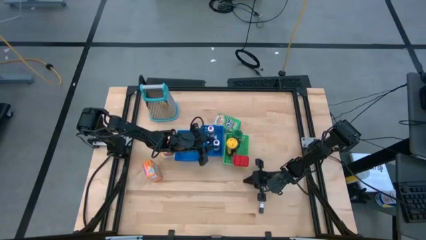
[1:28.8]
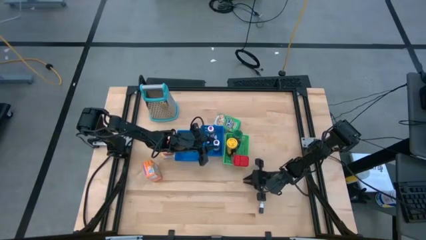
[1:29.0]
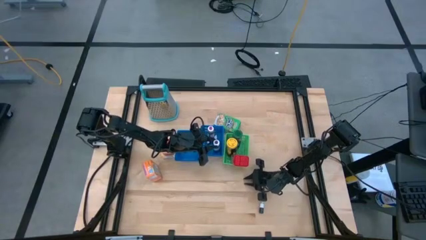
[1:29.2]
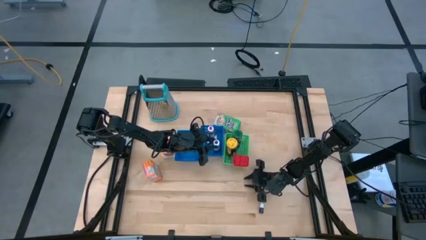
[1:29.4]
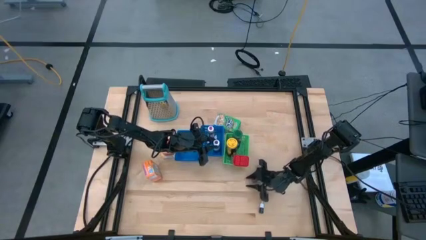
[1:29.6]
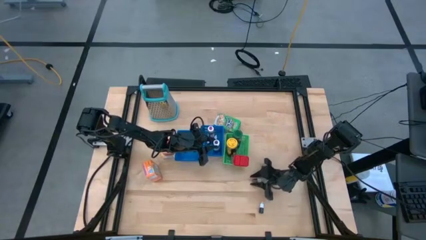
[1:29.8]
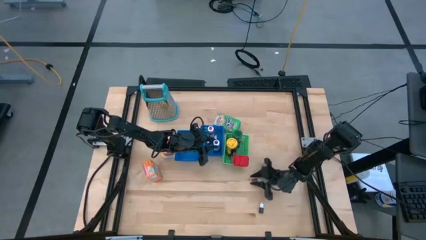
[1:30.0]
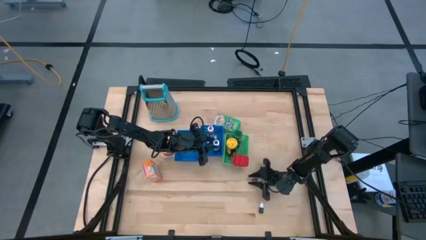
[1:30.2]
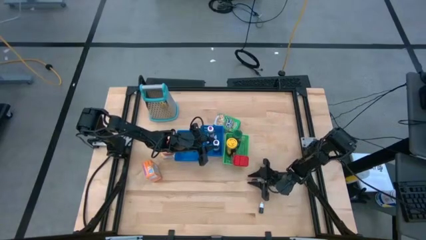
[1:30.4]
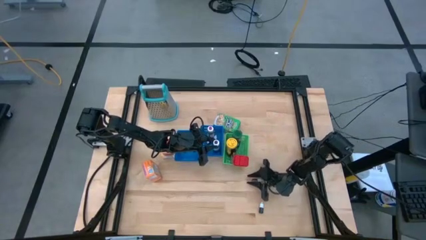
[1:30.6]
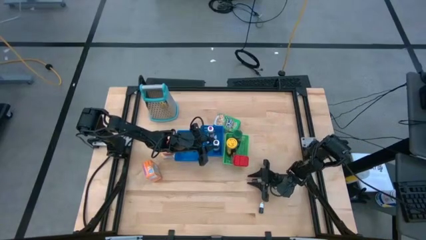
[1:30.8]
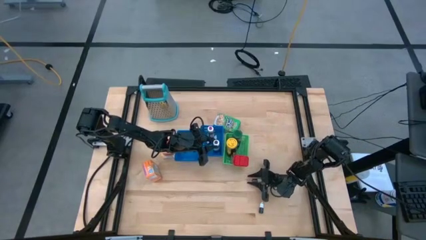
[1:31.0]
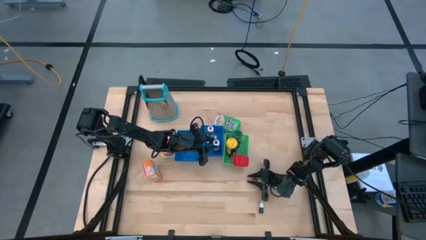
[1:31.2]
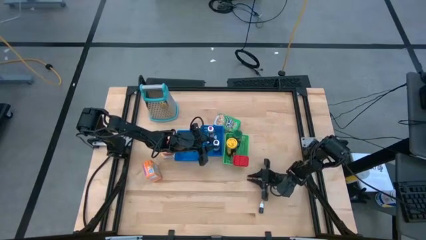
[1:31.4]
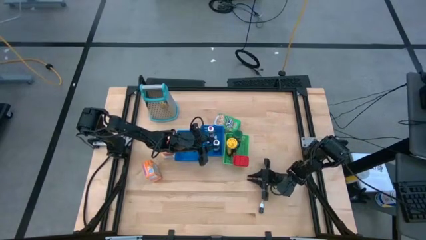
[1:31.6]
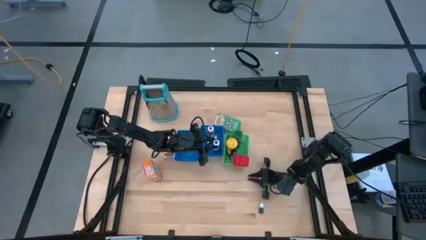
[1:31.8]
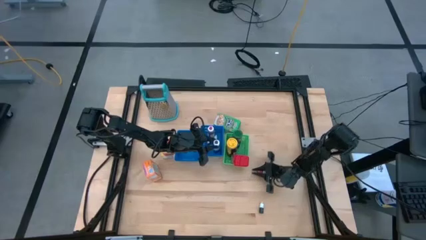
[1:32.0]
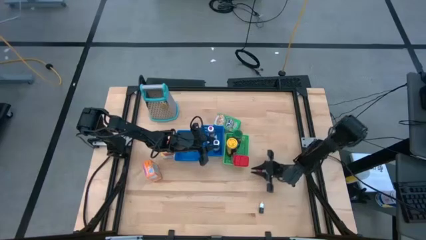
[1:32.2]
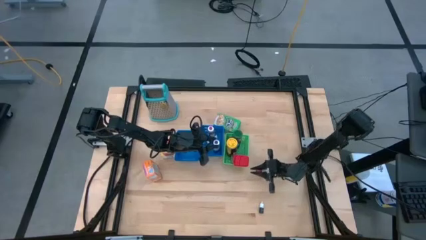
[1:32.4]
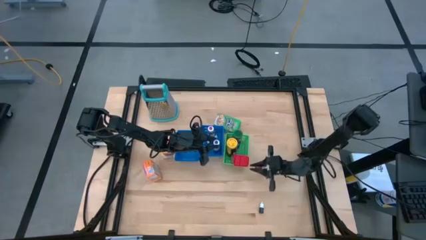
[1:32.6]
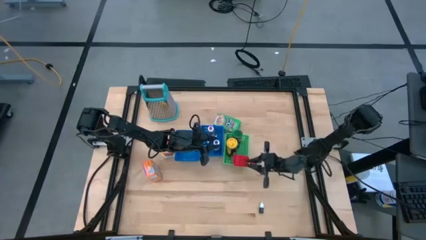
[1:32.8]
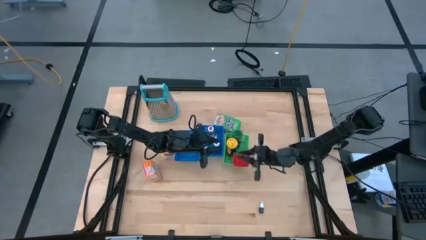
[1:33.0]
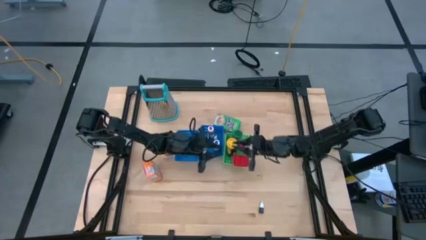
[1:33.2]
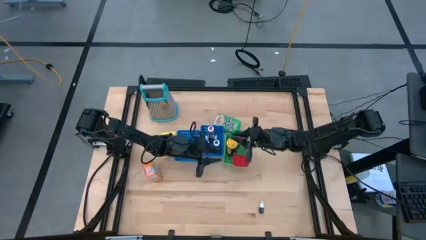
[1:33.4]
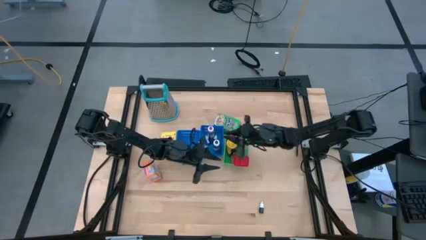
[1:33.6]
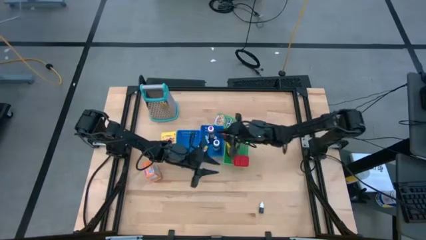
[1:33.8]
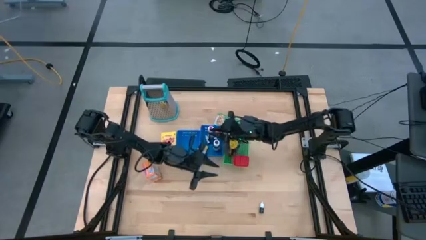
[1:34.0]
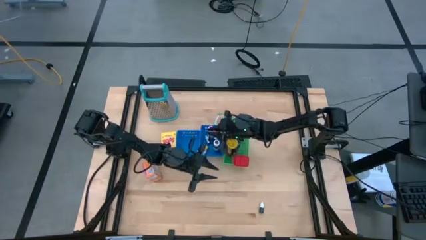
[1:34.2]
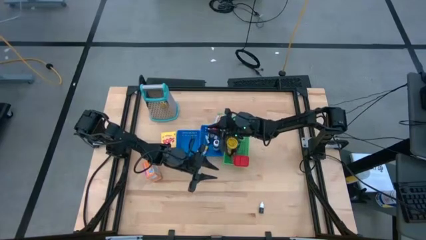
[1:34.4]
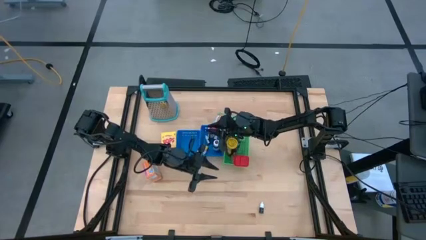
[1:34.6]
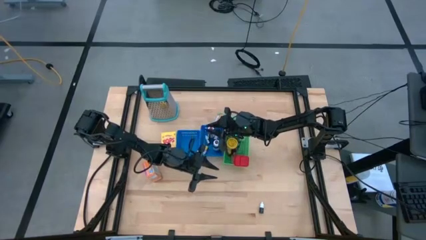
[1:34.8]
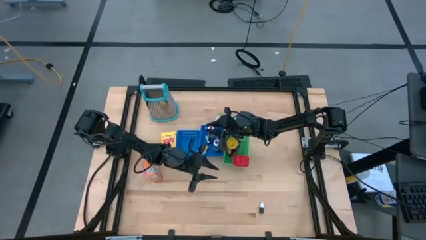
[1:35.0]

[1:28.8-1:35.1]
Task: Pick & Place Kitchen Items
Put the small pink food coloring bottle into the right blue bin

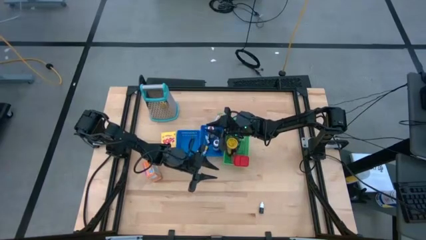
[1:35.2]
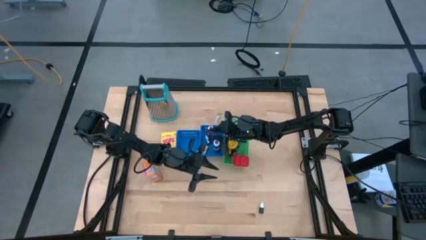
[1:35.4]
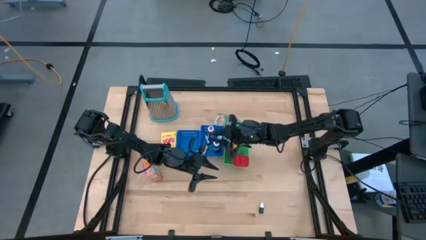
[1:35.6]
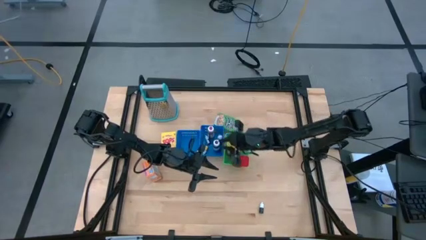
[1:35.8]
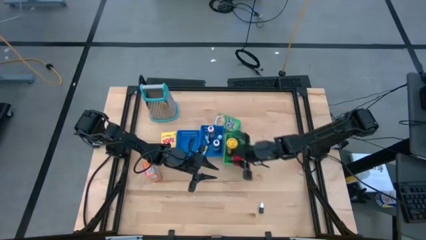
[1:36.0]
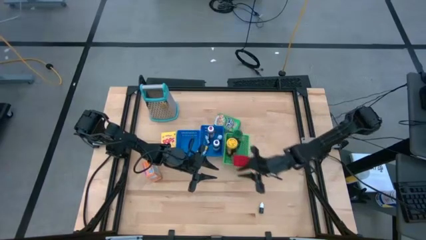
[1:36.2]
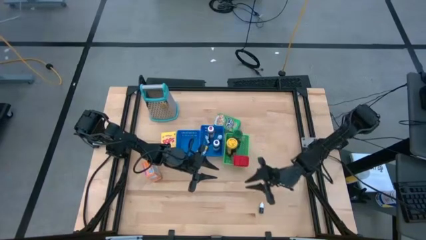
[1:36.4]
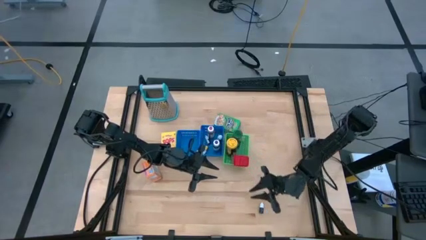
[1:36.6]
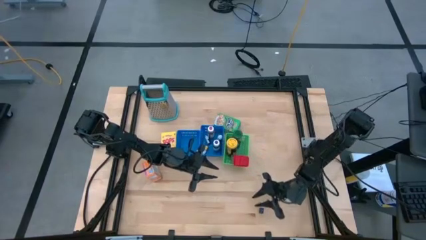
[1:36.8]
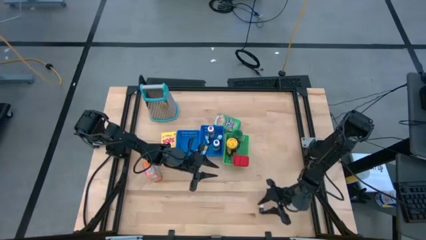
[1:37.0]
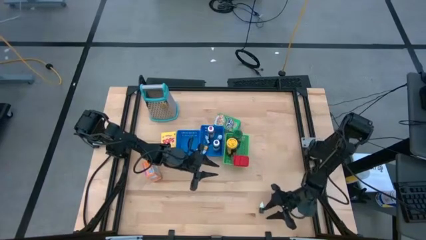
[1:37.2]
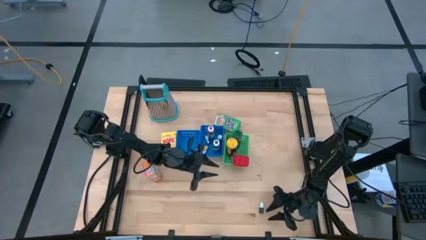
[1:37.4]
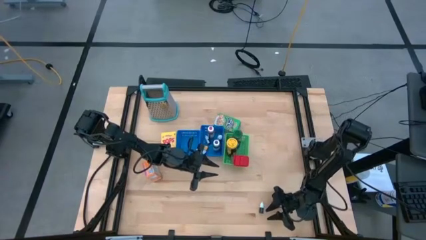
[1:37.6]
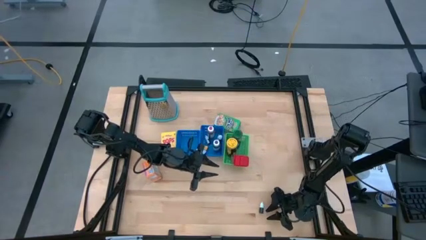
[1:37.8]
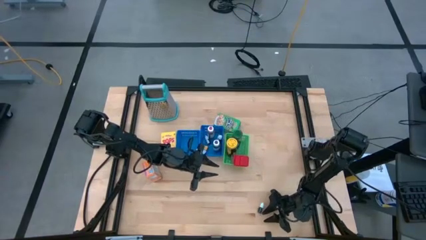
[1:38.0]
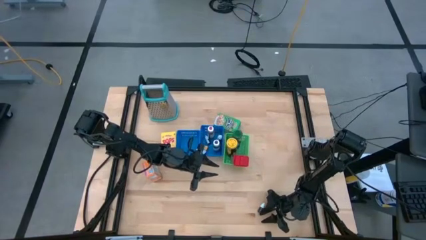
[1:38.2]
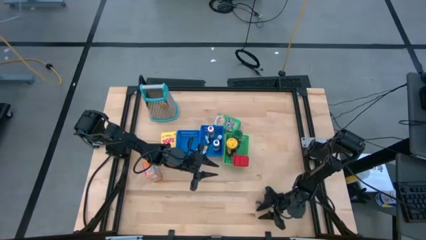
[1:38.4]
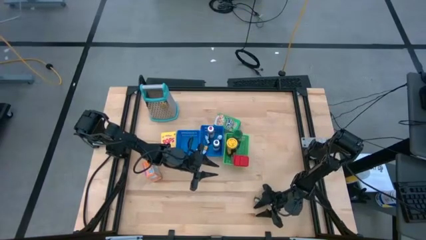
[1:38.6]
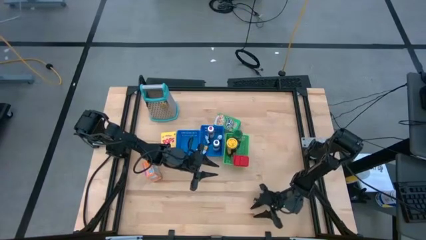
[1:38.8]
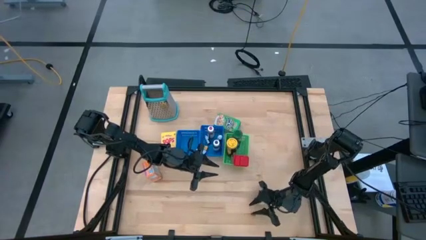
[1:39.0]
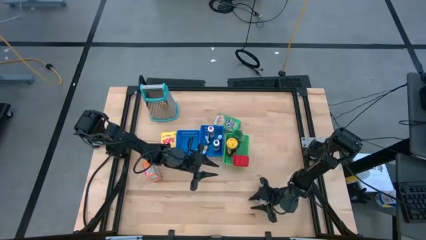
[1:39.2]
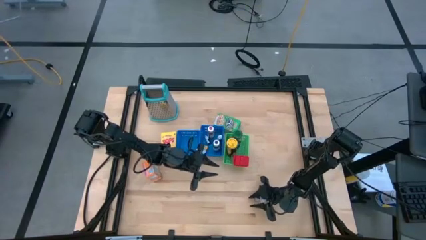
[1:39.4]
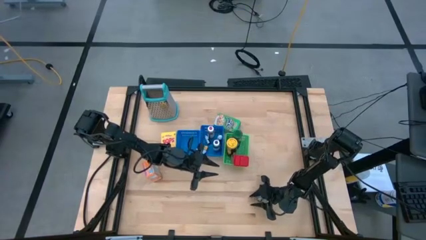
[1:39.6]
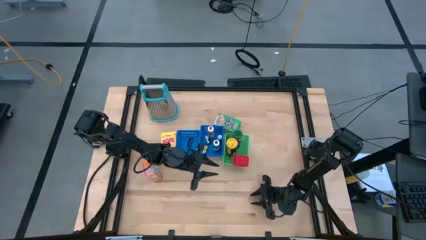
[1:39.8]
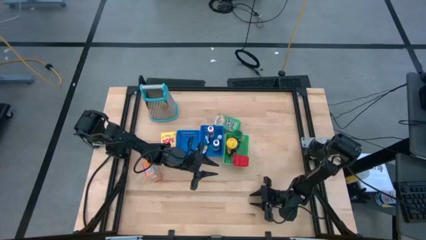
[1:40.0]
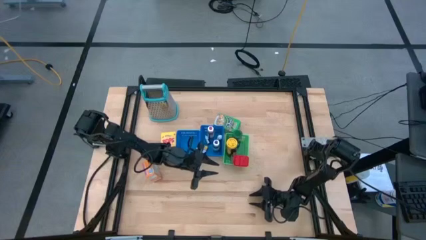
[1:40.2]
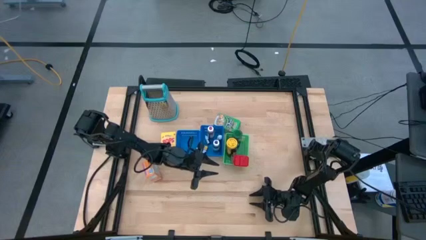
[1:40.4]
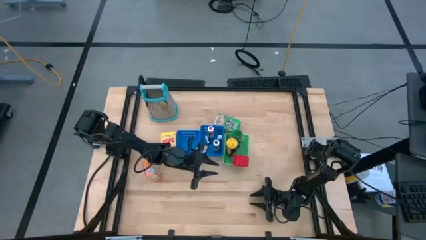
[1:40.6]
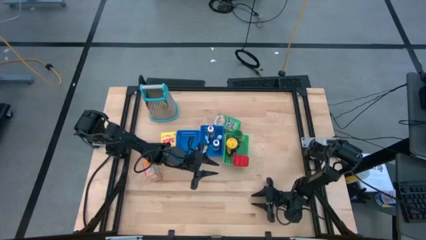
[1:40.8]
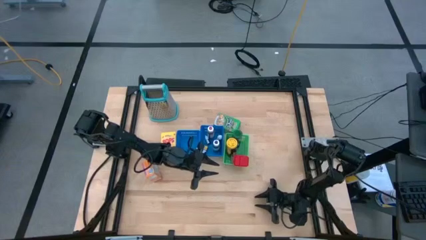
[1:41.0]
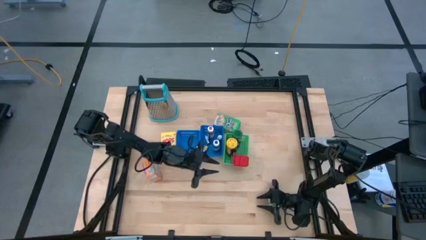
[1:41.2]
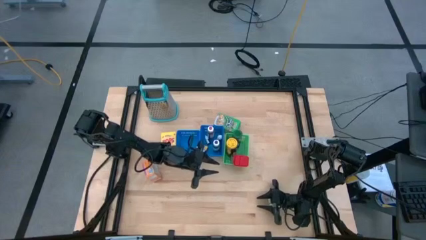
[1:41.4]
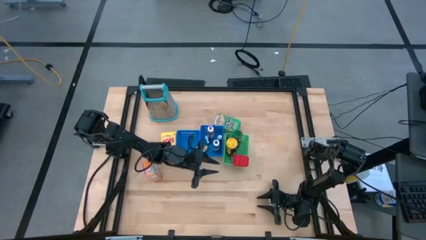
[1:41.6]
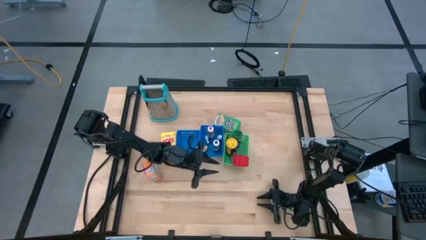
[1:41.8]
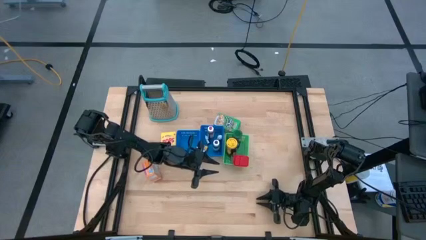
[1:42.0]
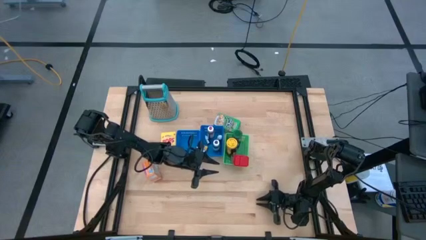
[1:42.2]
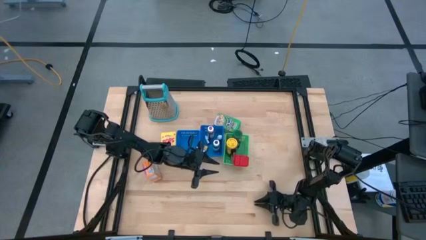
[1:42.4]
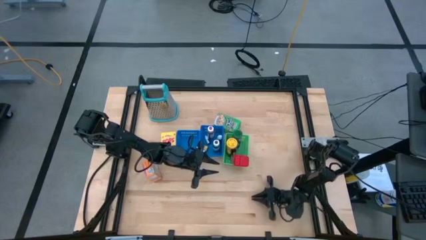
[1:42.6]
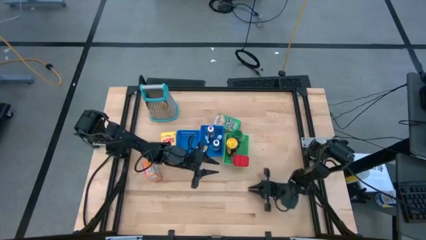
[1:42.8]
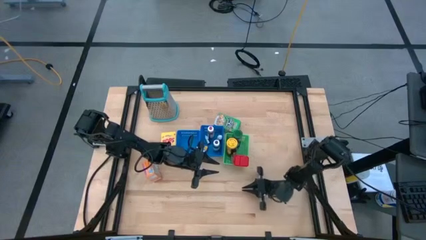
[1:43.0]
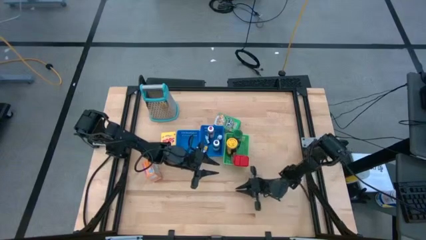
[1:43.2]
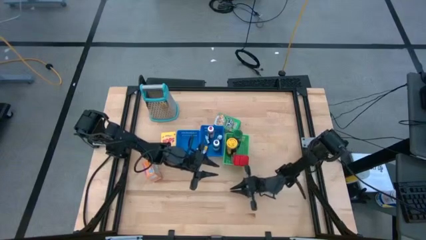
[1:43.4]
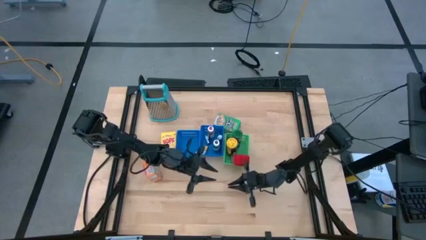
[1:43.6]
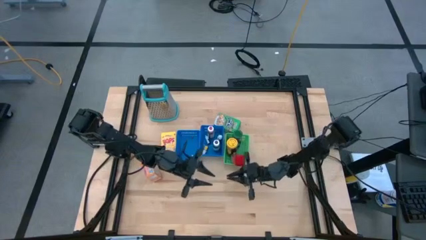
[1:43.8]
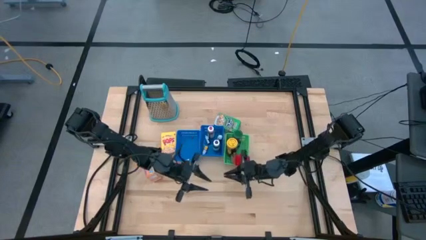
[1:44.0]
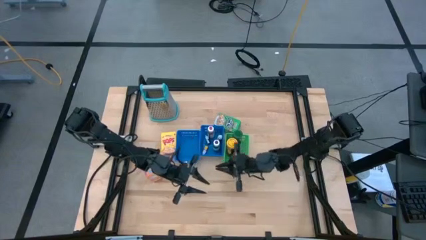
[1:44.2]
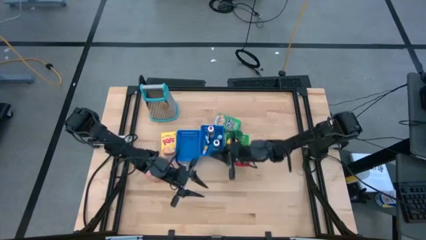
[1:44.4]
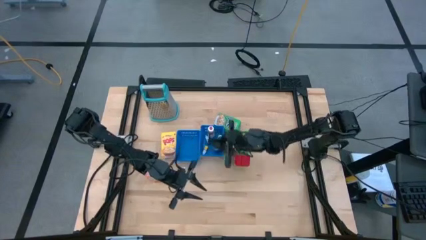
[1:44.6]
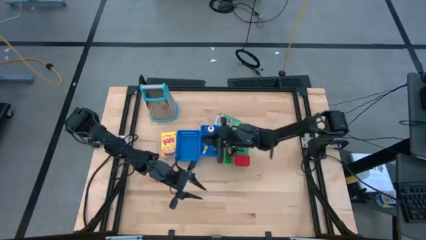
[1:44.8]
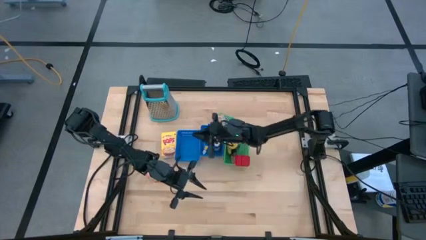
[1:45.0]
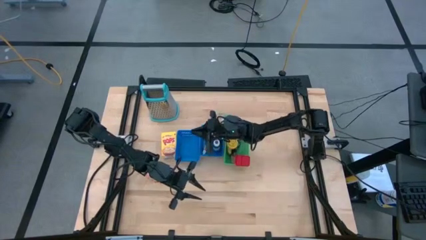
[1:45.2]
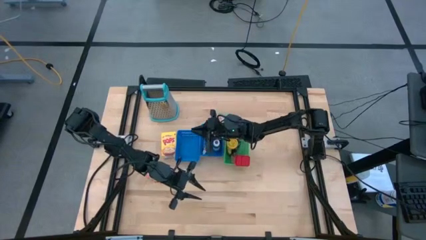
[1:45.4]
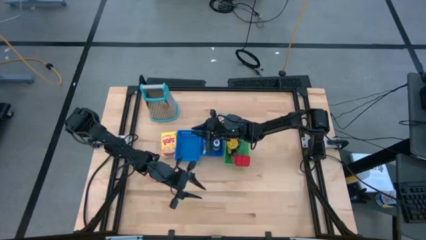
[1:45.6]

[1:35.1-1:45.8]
Put the small black food coloring bottle into the transparent bin
